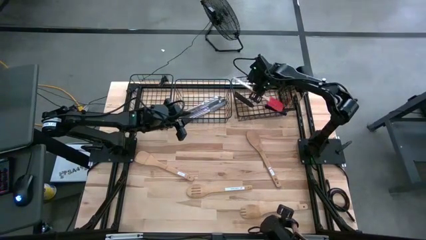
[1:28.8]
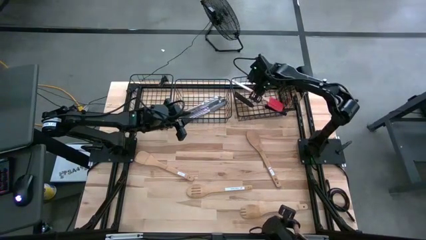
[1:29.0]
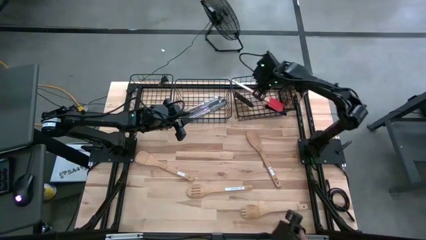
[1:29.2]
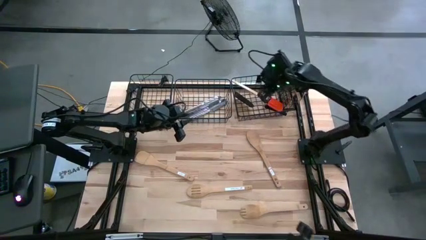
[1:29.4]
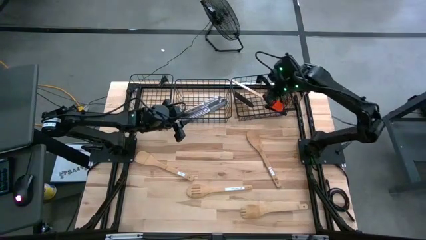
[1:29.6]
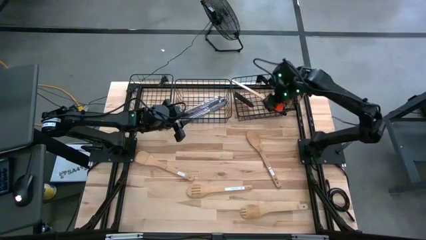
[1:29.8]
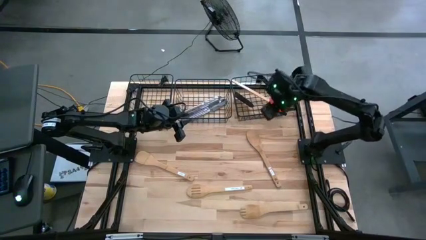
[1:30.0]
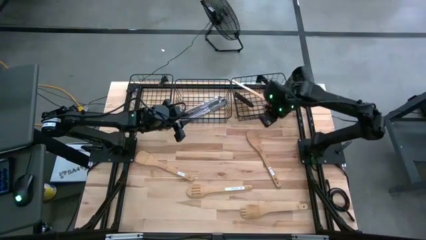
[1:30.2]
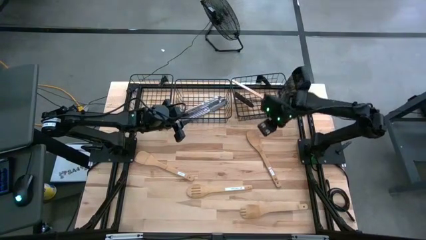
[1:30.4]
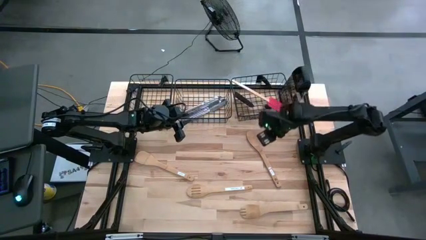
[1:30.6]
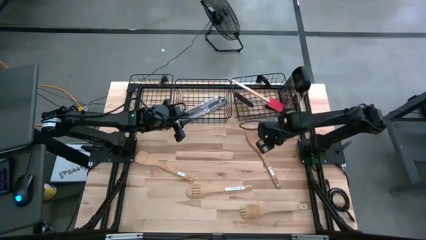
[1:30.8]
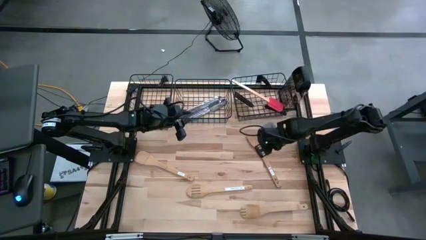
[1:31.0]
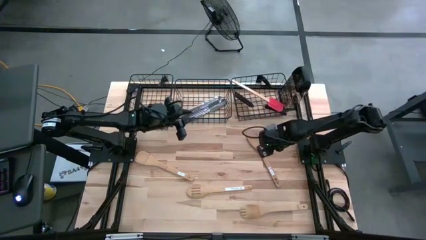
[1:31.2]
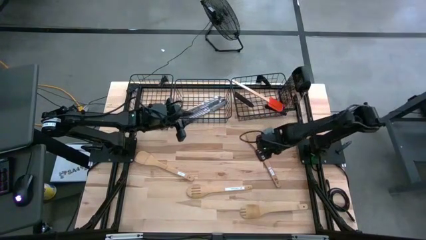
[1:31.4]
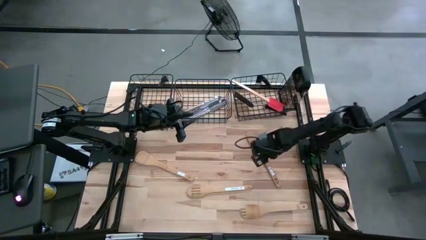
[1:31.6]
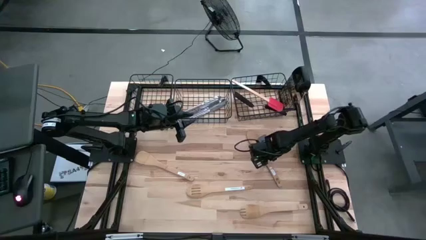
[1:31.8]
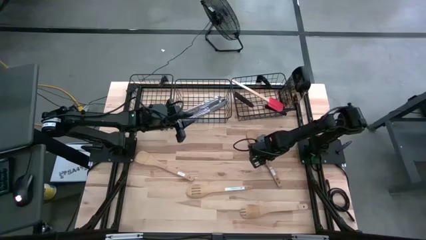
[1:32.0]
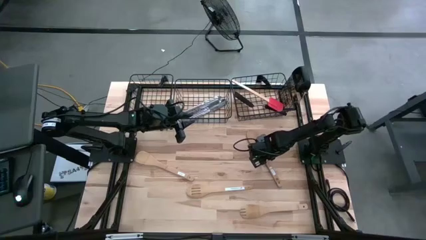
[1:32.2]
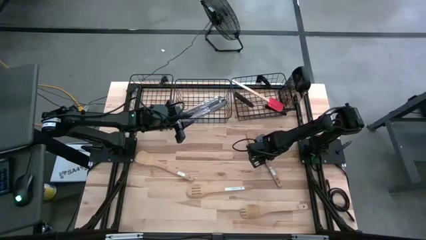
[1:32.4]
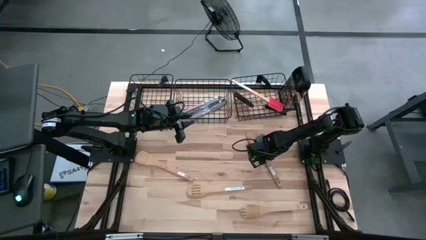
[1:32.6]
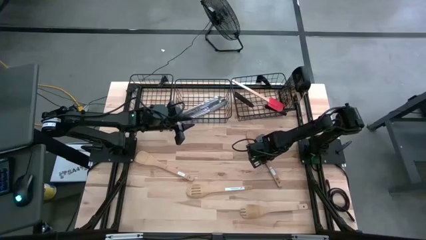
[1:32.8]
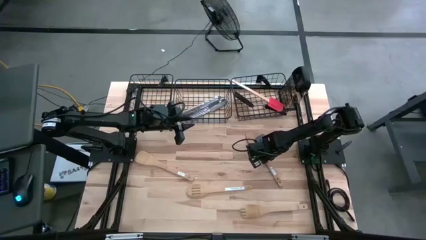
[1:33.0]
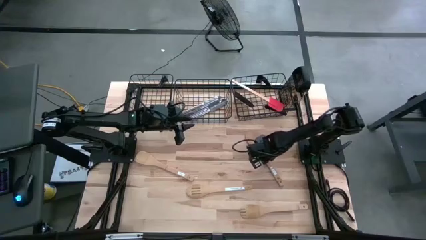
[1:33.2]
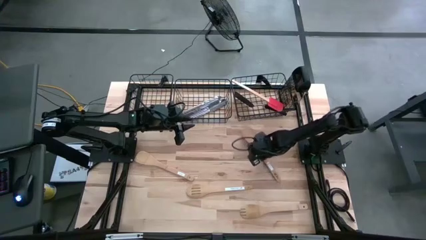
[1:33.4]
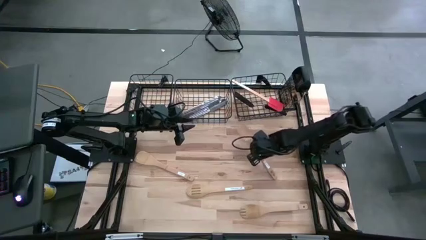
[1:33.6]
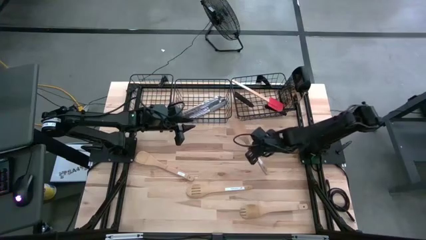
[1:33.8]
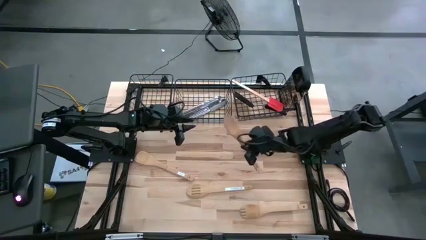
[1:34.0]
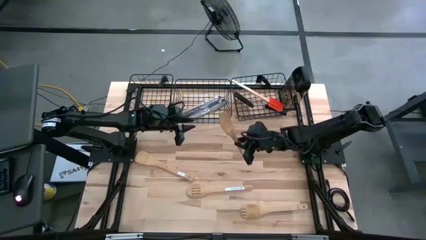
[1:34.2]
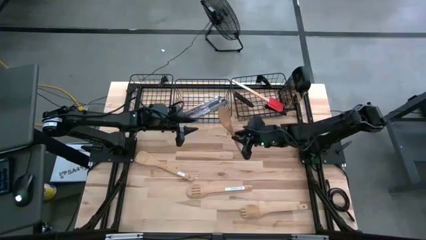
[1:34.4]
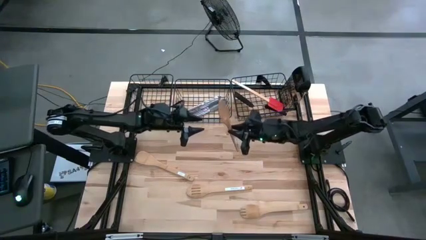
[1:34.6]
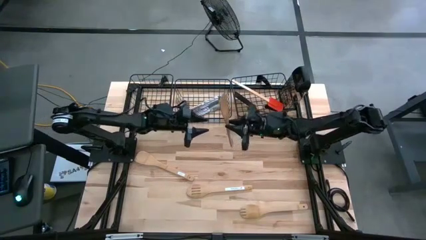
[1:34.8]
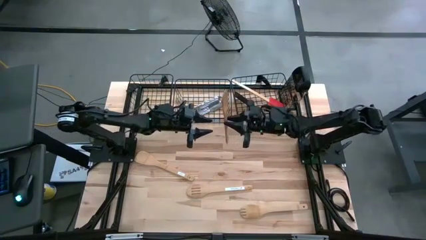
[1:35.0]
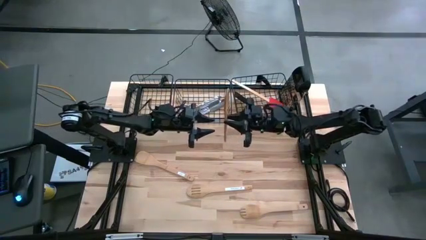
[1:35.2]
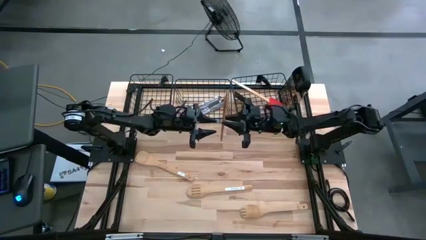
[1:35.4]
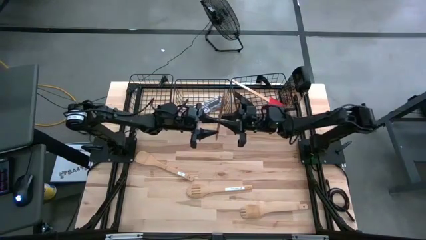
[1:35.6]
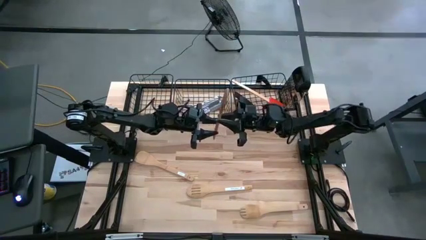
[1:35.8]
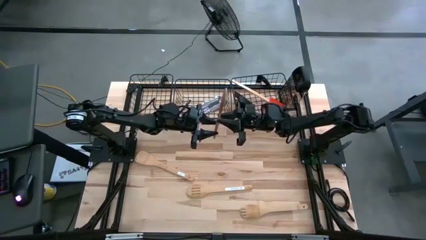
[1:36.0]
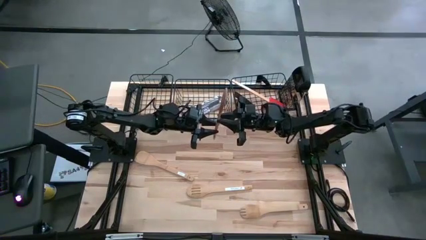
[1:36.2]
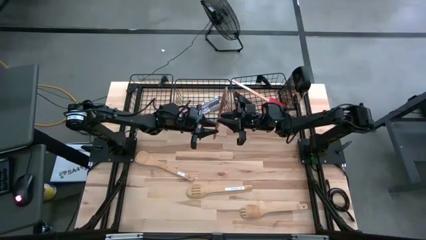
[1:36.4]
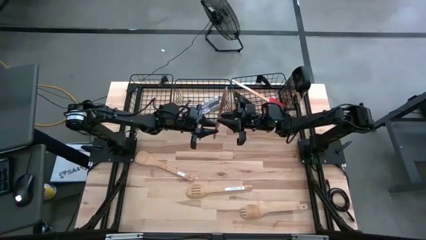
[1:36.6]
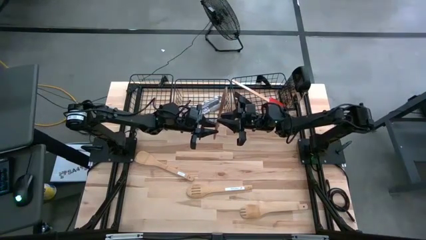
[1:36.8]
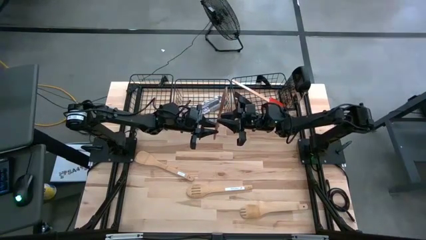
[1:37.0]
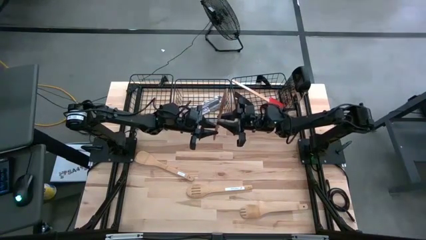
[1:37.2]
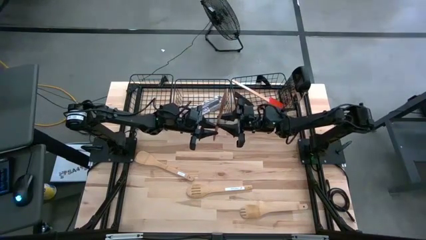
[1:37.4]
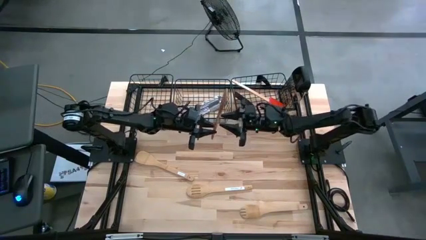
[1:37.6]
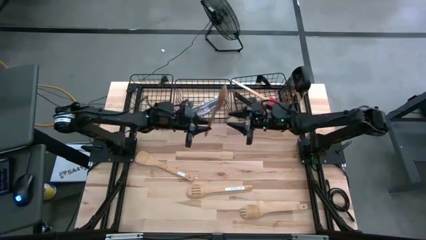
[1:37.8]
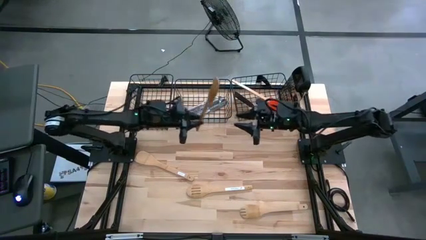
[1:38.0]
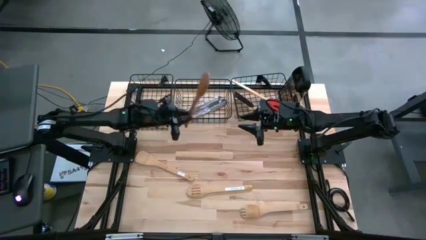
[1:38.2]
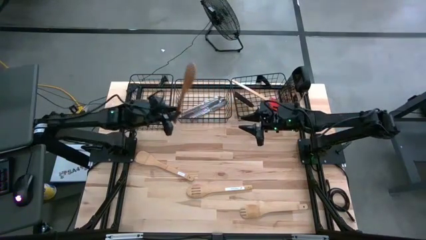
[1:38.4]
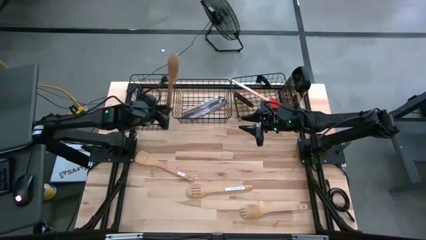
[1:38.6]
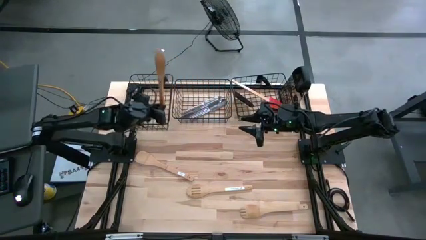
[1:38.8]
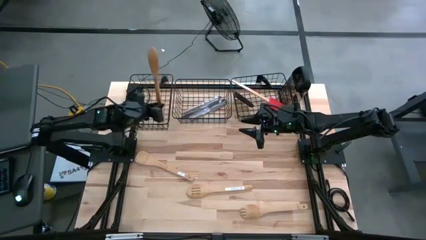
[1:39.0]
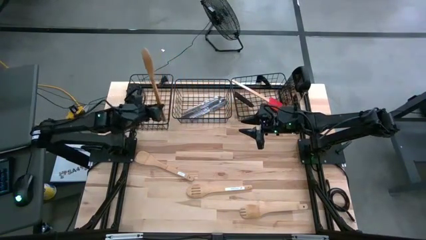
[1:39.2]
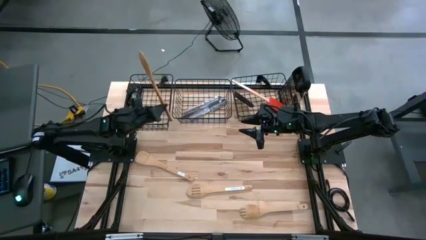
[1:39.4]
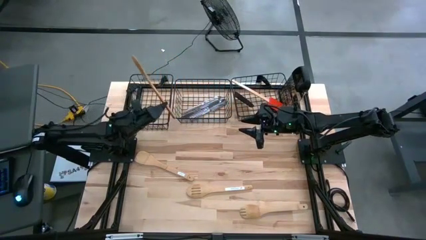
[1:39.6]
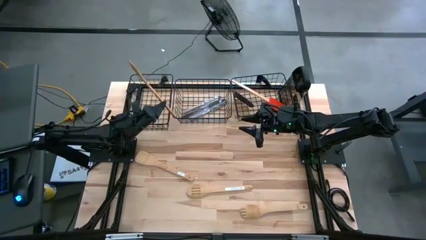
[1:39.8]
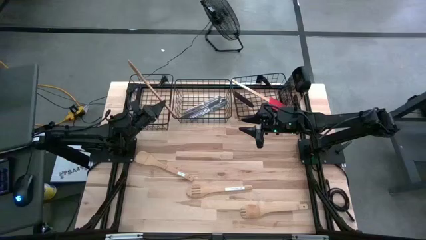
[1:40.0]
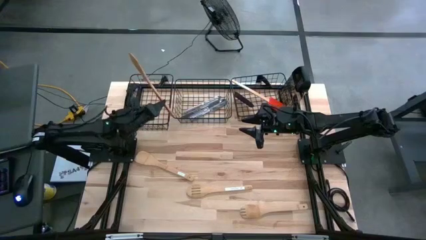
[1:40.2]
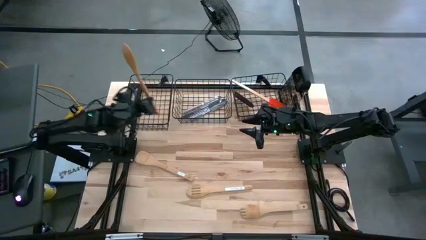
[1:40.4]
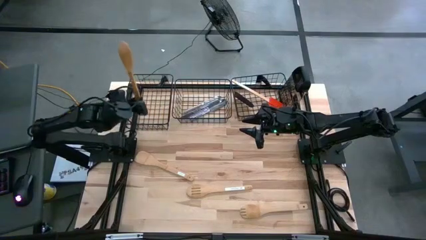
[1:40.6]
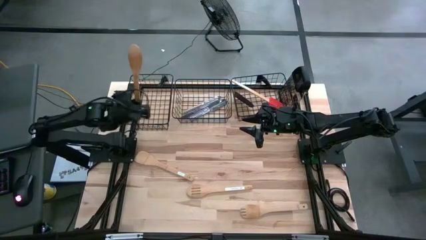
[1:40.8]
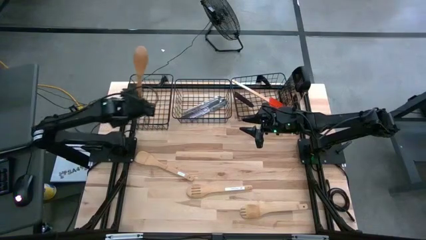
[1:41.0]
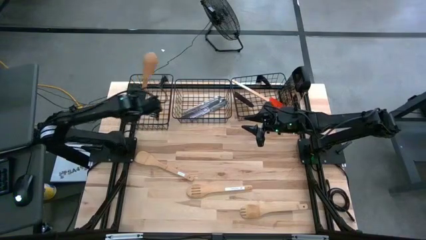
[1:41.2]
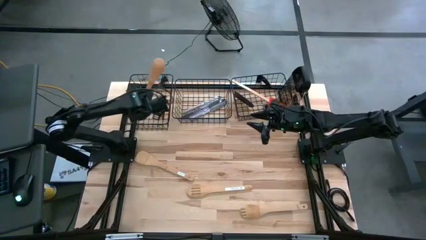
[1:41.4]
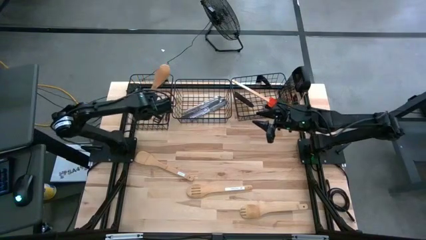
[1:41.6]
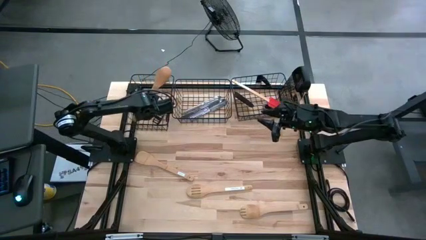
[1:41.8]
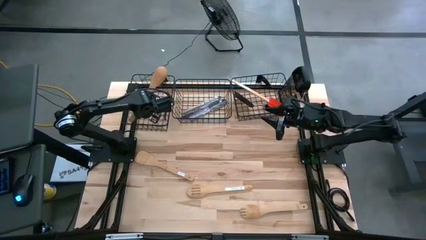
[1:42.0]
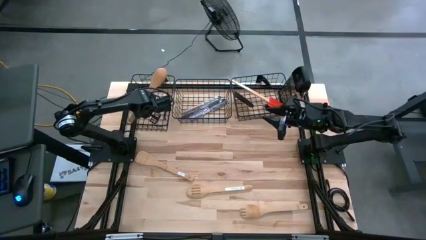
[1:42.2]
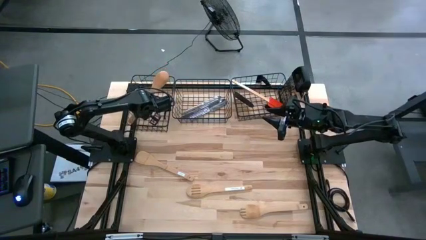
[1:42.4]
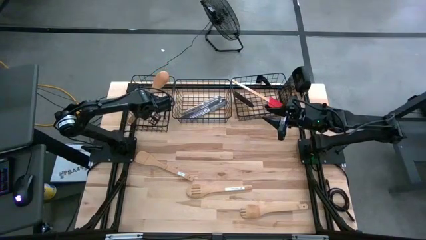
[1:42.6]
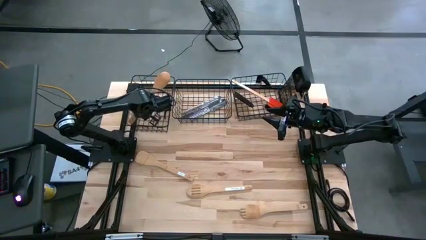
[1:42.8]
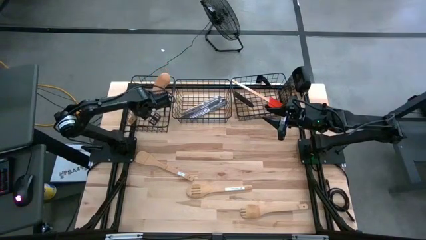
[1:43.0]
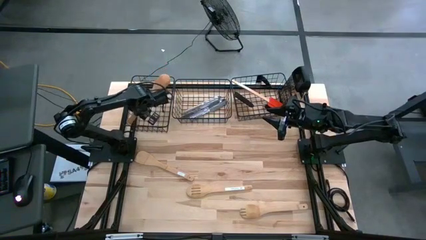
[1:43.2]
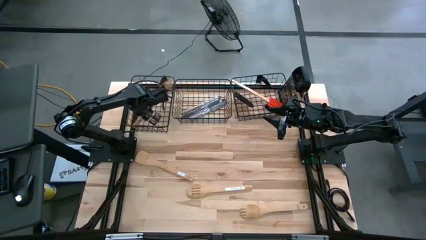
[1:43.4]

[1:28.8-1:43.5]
Task: Pick & Place Kitchen Items
Put the wooden serving spoon into the left wire basket

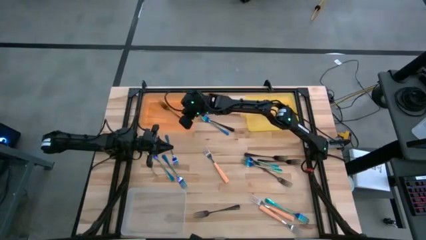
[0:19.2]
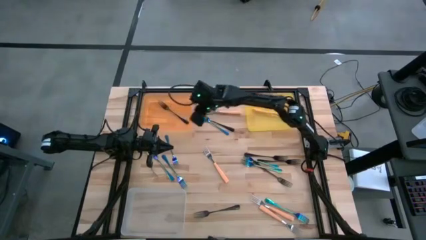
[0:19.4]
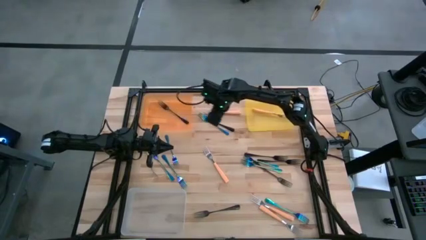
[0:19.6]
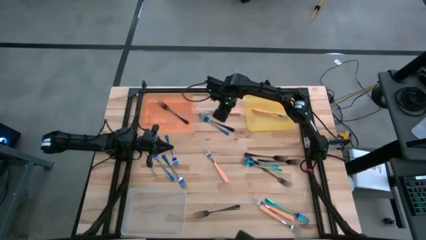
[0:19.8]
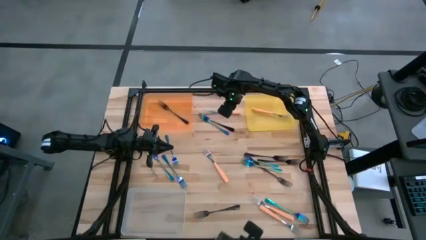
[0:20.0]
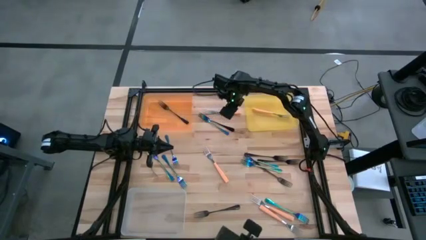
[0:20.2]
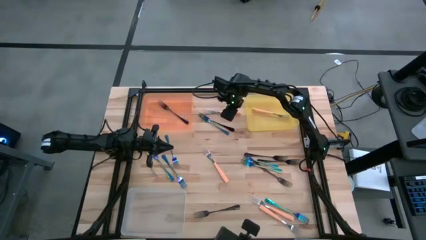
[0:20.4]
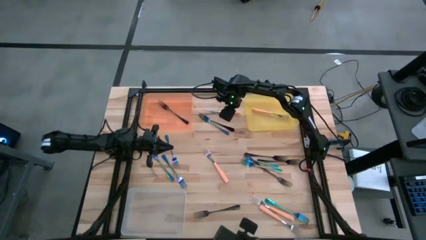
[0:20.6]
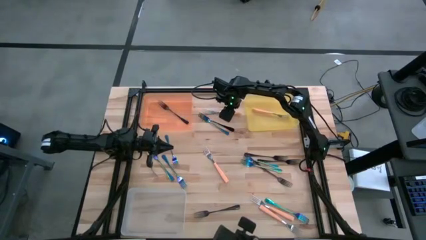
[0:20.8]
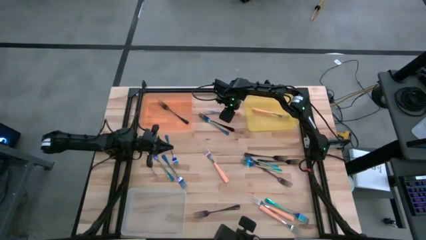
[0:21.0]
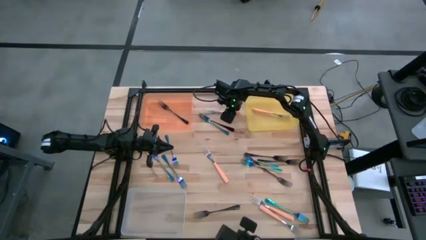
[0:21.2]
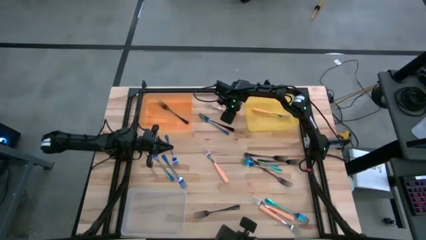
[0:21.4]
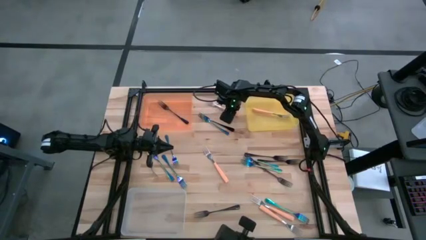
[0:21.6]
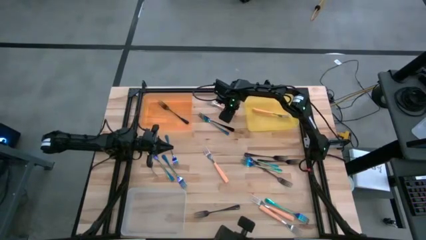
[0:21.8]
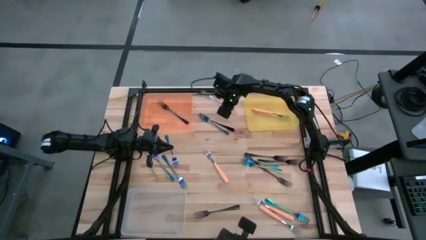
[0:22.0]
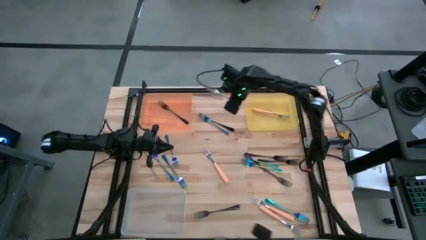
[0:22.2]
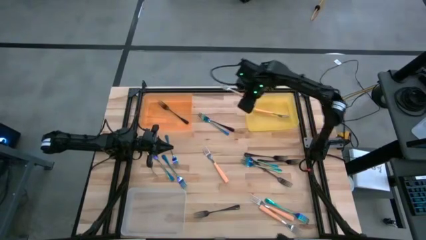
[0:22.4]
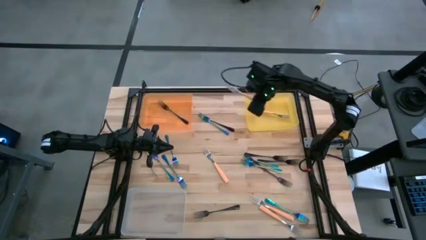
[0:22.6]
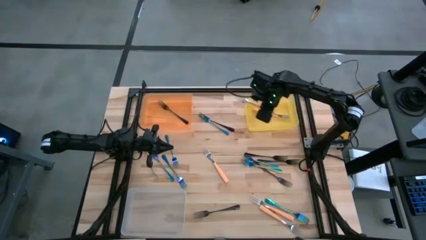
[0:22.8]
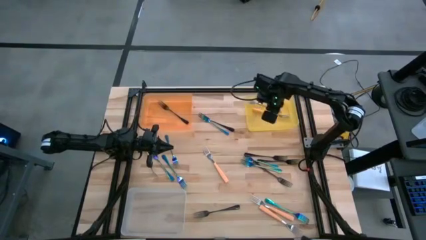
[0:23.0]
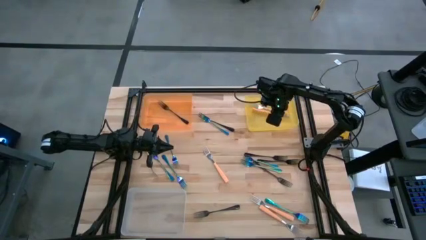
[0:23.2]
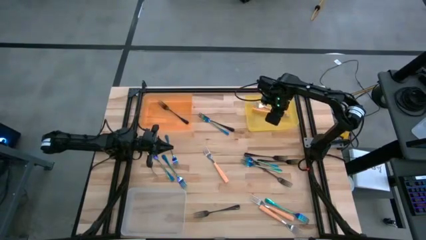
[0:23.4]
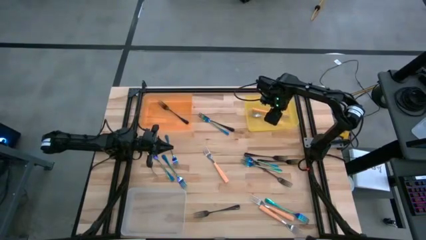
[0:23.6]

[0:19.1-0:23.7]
Task: Sort silverware by color (type)
Put the orange fork into the yellow bin
